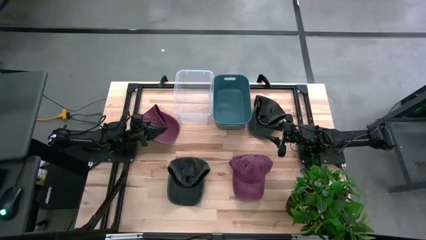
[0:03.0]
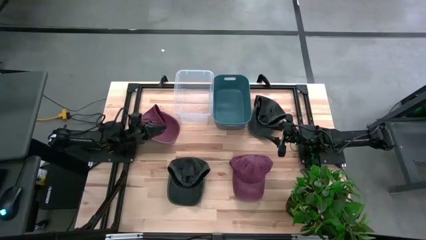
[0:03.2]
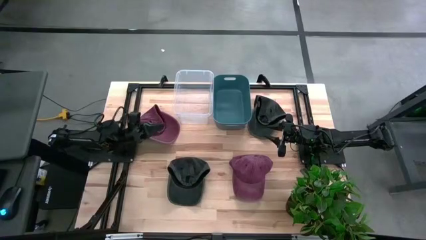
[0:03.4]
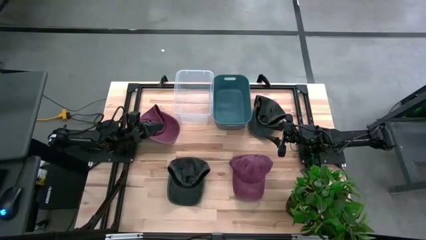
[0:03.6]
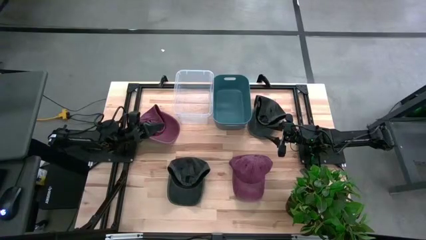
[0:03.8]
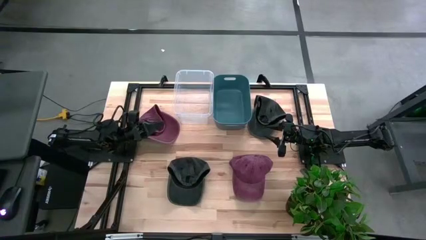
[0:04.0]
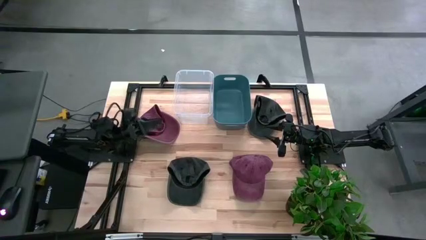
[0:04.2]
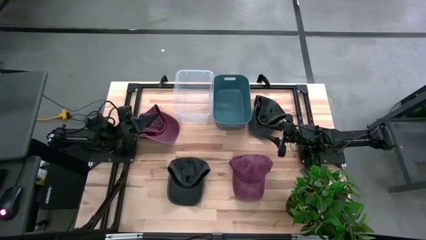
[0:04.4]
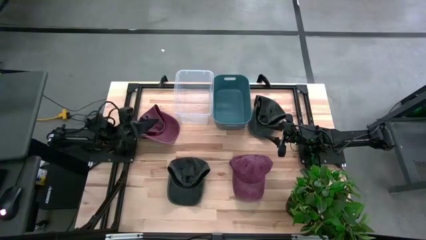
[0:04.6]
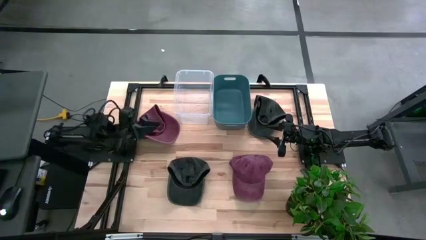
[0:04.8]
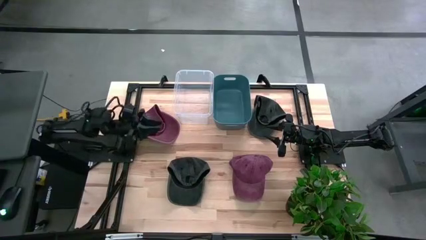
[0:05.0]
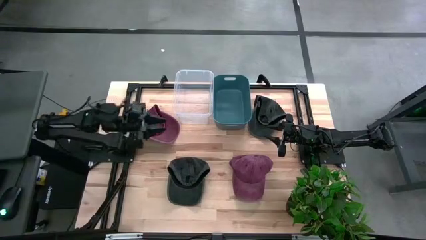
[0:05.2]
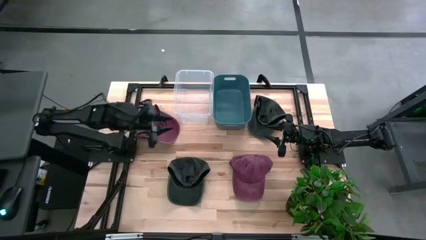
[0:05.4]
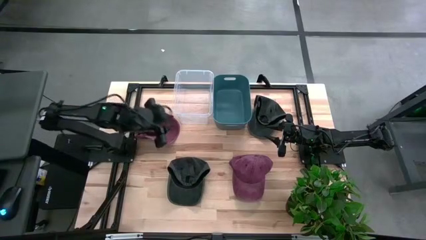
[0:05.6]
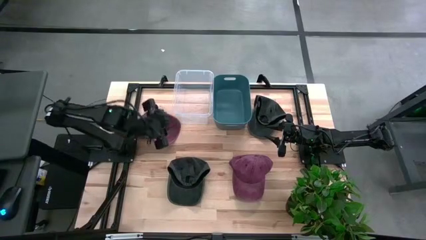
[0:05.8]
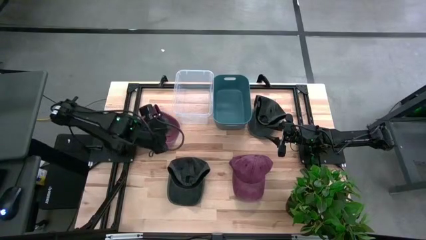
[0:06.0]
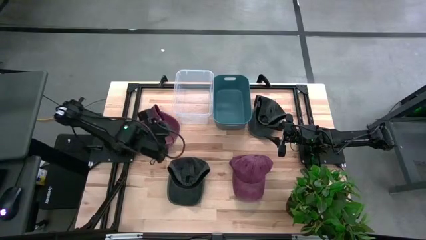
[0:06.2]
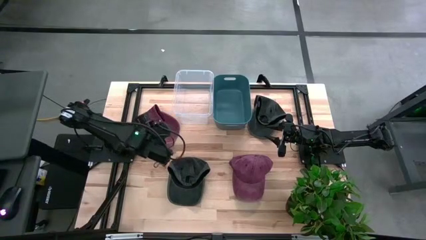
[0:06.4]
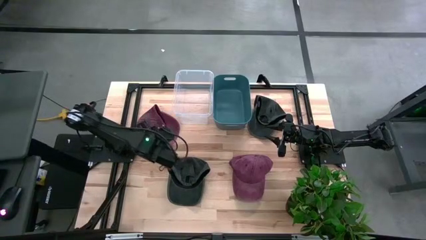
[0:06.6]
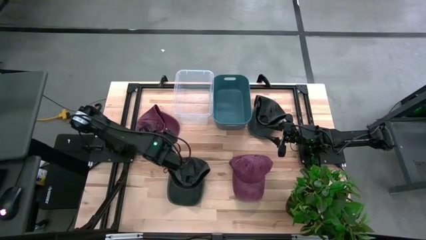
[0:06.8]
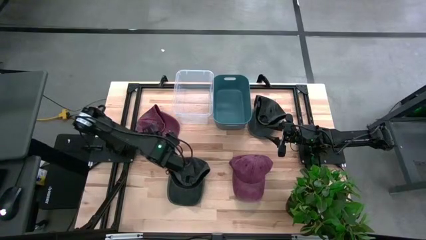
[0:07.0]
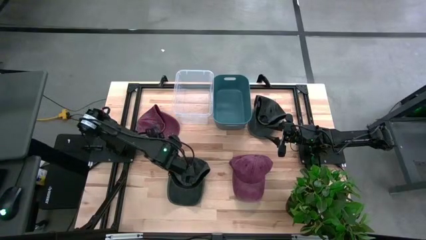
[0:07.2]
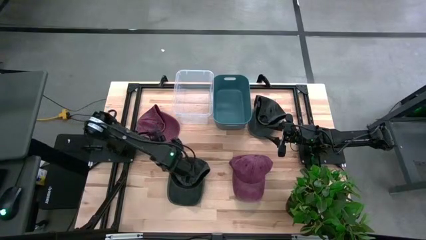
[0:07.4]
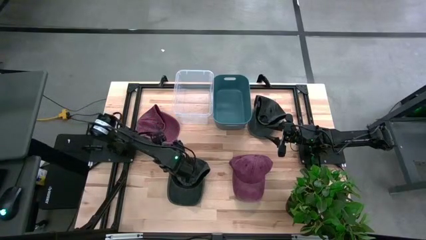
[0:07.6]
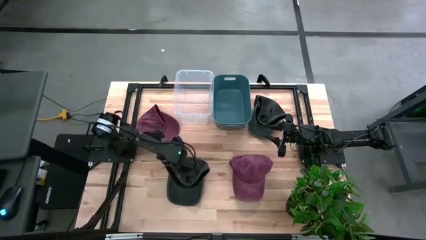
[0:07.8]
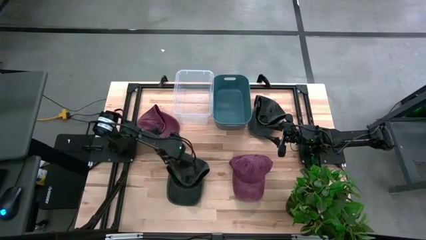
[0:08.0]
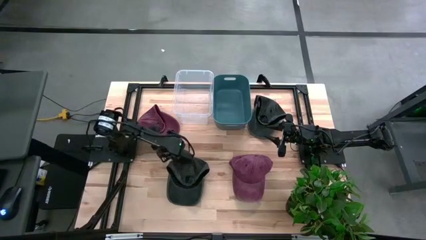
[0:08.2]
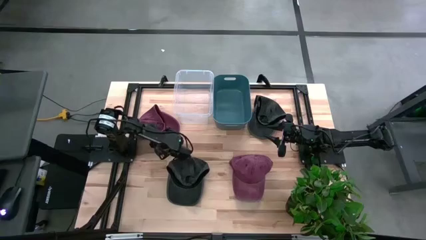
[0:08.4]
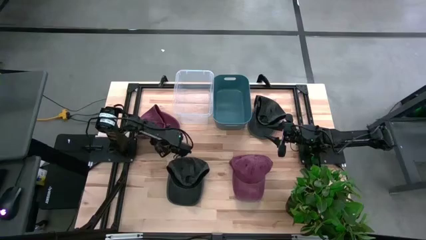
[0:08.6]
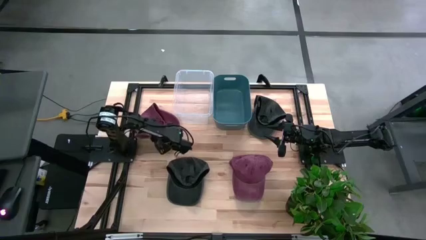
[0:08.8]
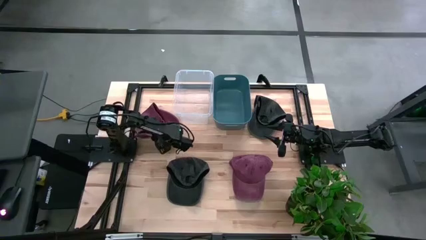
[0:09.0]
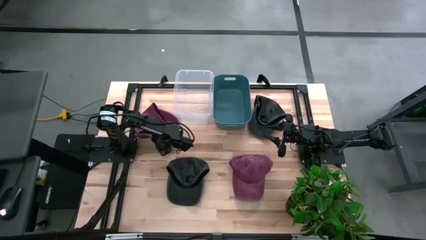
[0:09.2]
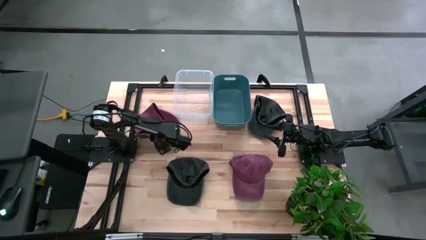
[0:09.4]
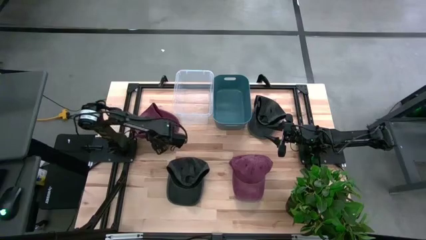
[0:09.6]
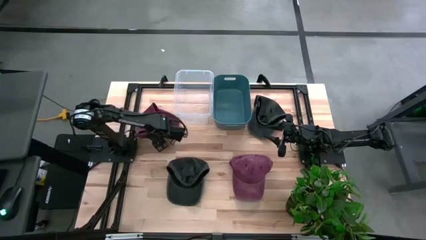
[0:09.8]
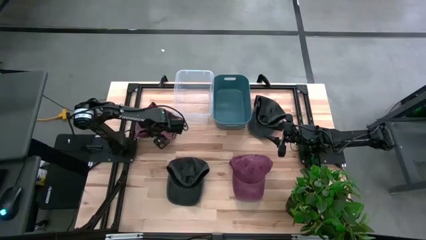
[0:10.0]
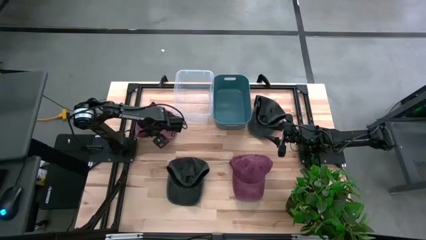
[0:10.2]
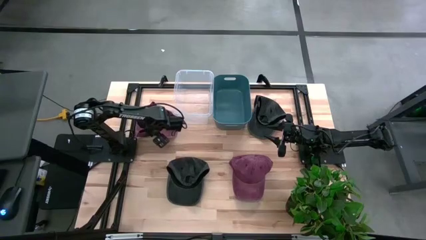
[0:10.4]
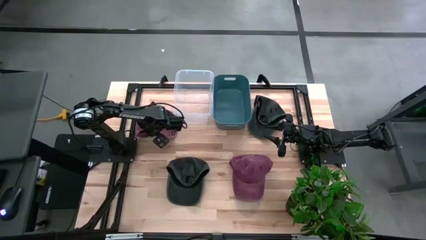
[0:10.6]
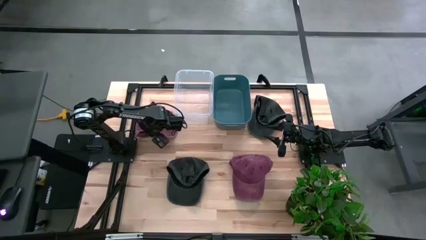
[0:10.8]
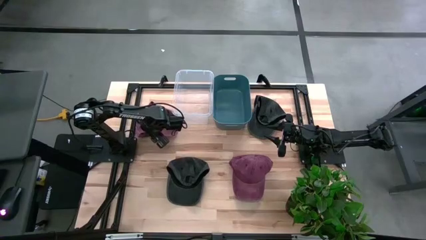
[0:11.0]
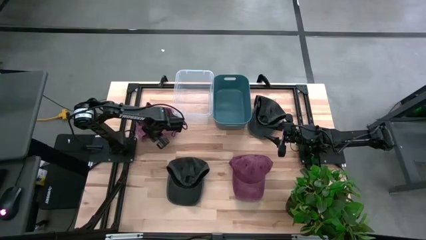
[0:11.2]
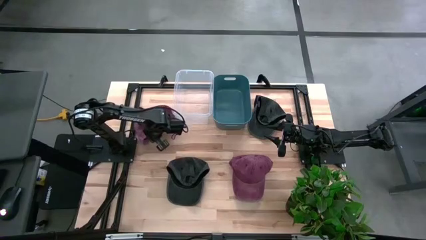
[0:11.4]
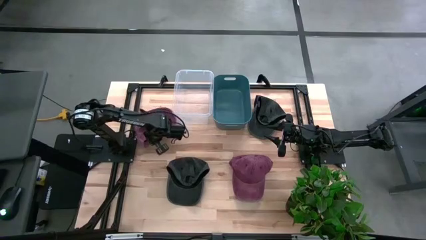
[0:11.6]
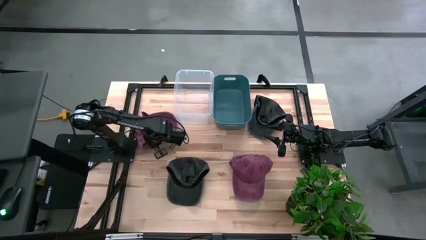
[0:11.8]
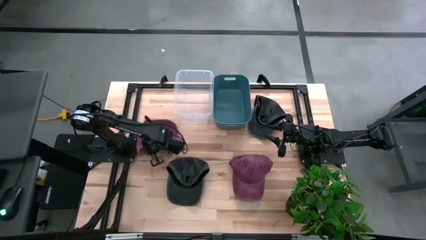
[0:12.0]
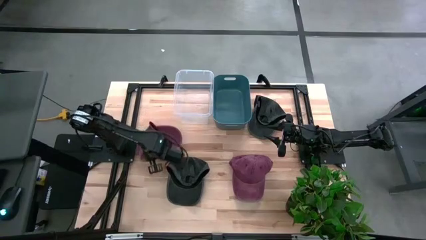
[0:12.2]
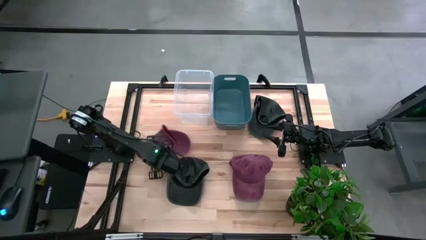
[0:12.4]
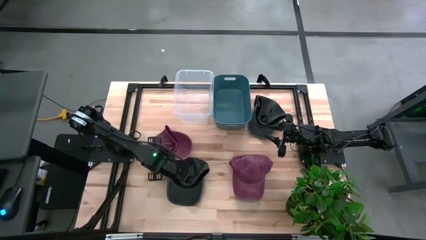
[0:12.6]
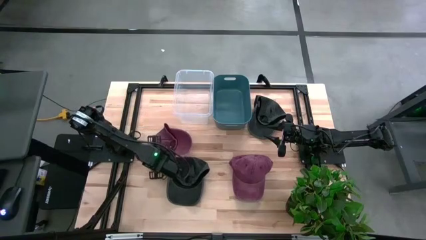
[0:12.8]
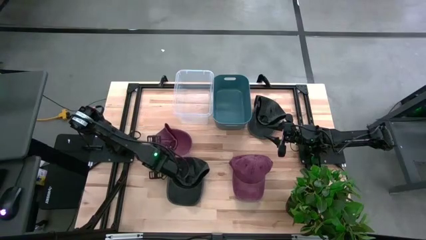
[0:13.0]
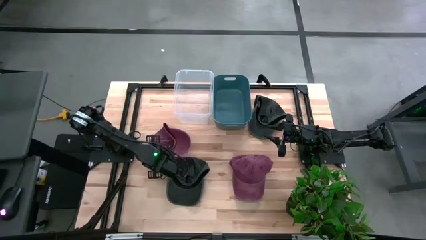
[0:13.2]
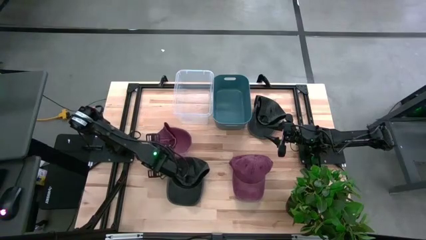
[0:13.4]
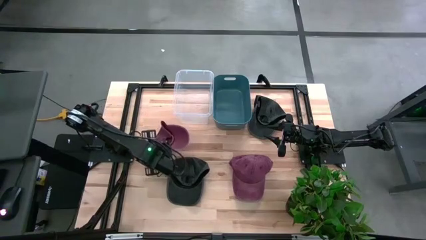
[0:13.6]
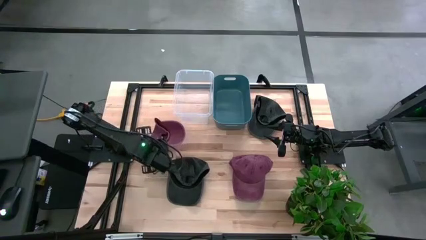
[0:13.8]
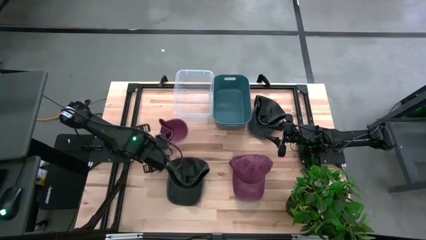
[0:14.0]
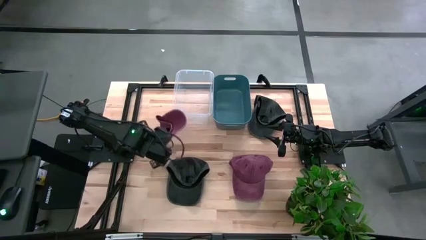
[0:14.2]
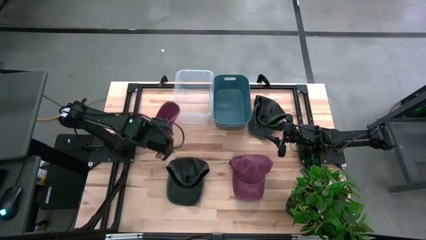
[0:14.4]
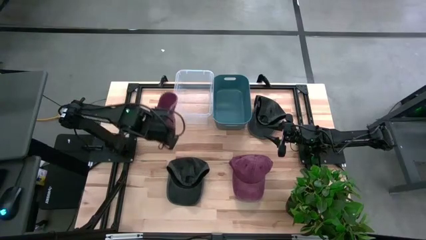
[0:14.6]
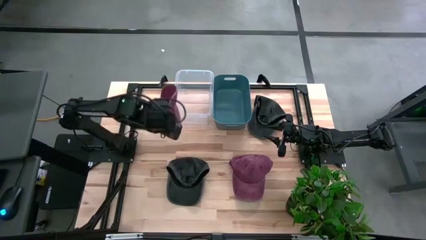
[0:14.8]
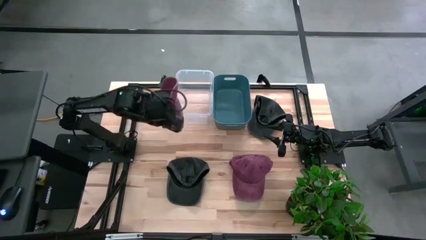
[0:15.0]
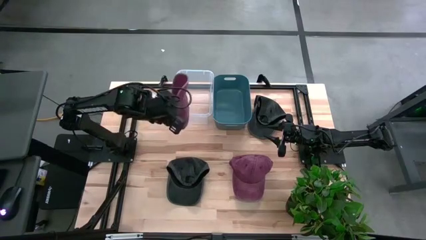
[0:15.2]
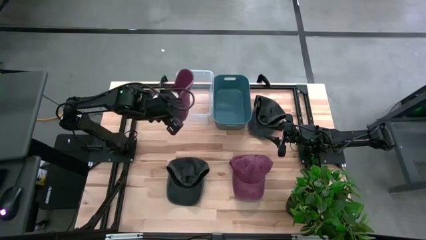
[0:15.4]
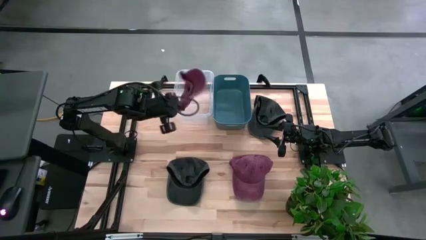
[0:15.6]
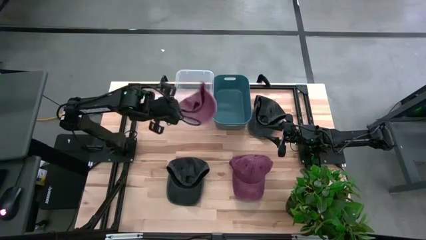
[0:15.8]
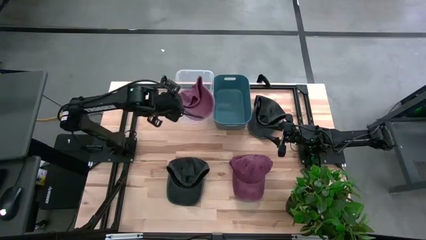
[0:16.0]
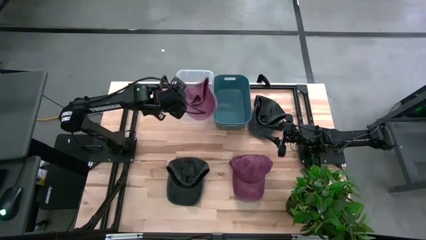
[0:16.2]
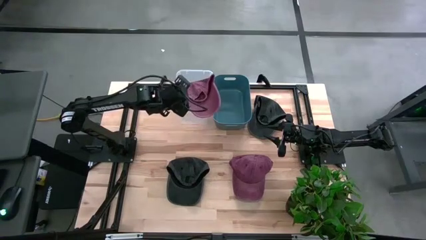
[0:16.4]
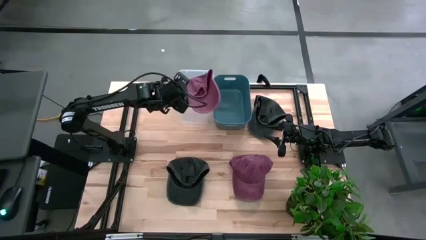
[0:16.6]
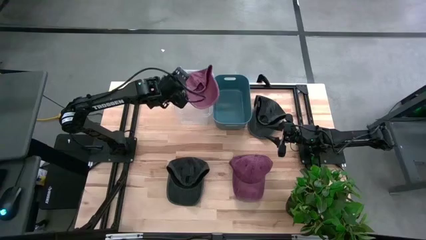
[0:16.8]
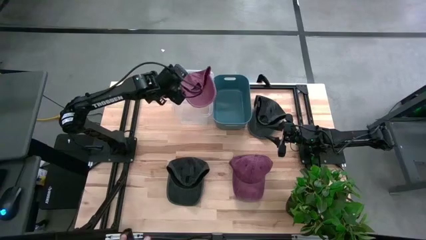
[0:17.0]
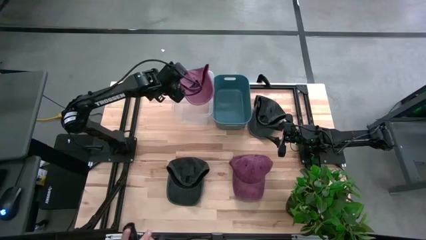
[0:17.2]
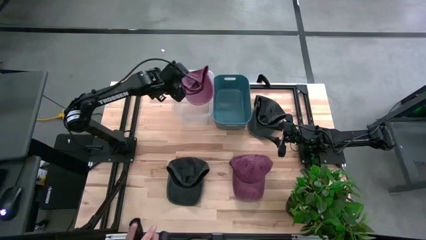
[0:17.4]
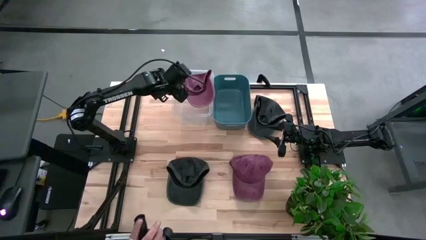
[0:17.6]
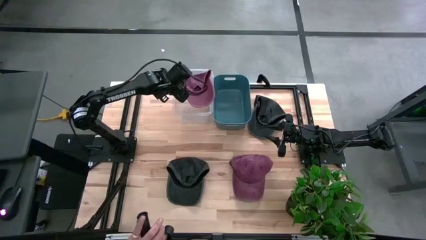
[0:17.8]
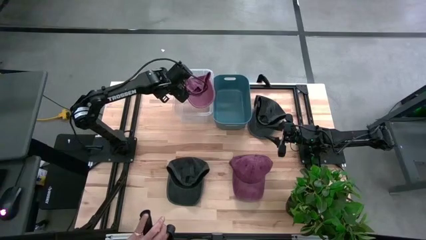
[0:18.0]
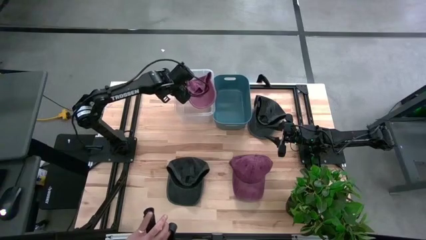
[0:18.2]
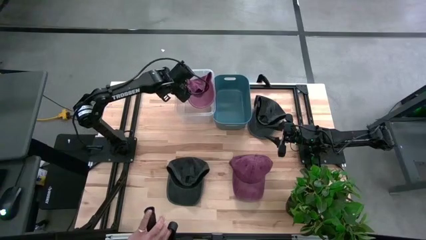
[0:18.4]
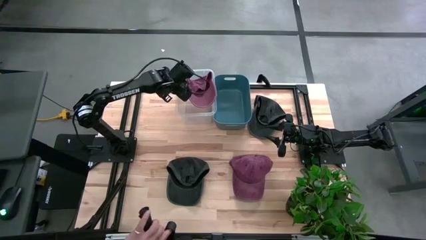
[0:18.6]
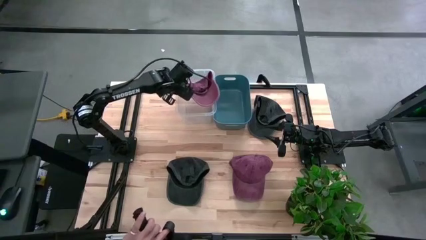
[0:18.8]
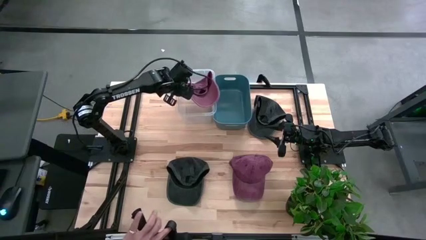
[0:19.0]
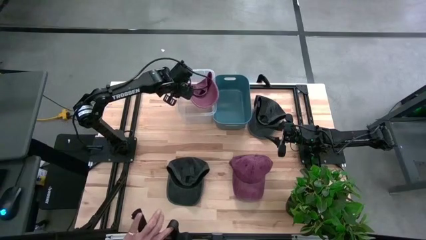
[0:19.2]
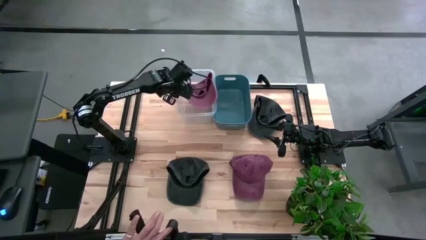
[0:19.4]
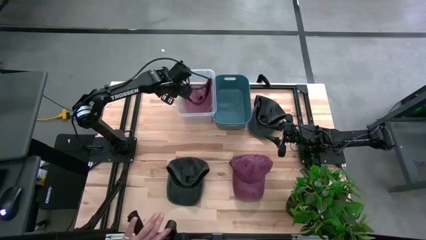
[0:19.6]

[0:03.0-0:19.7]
Task: Pick & Place hat
Put the top left red cap into the transparent bin
